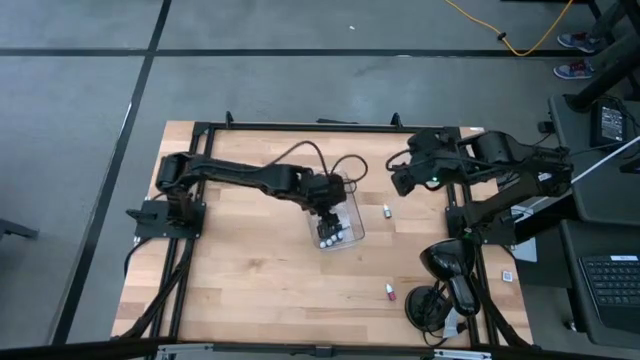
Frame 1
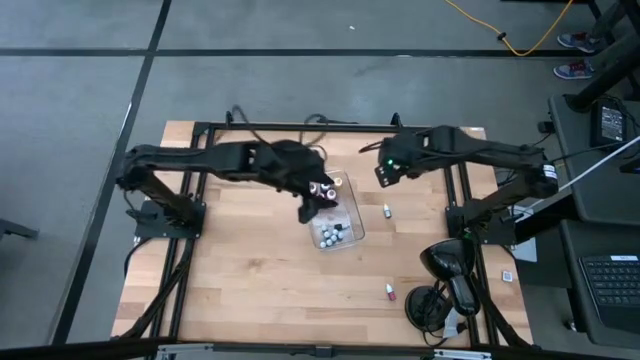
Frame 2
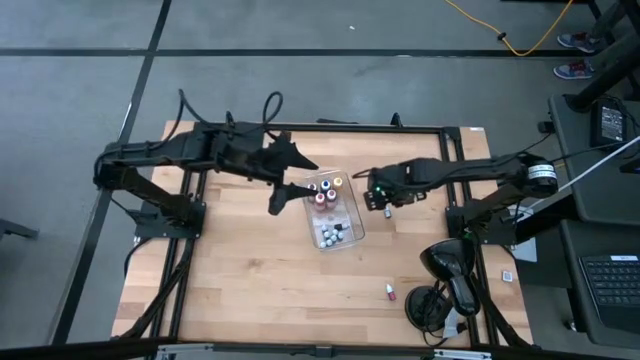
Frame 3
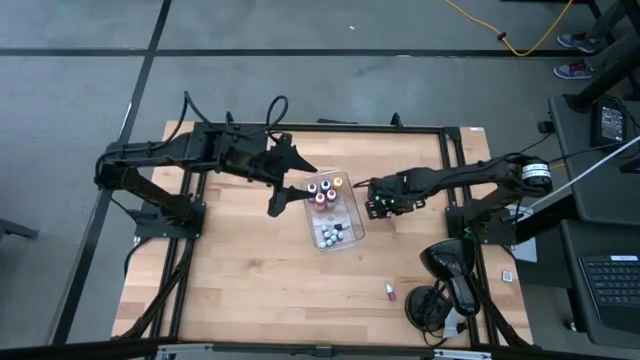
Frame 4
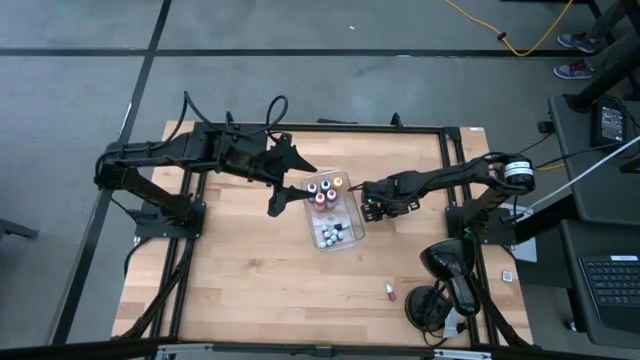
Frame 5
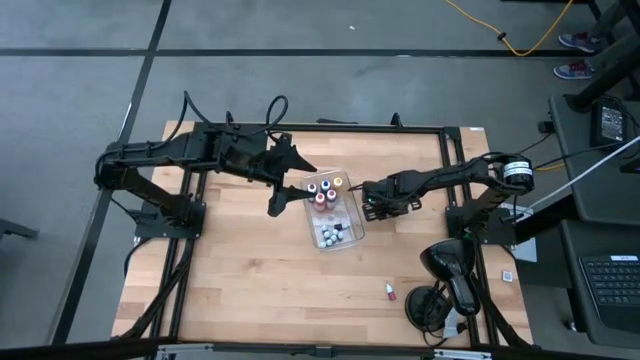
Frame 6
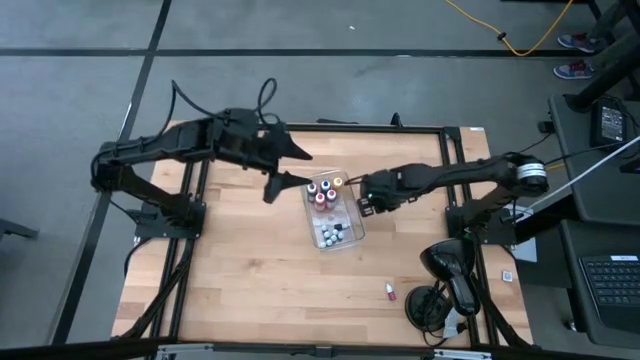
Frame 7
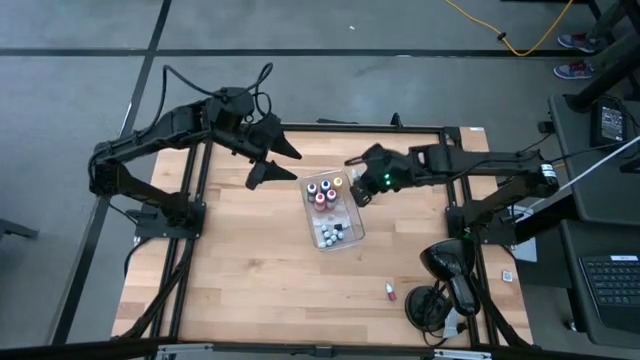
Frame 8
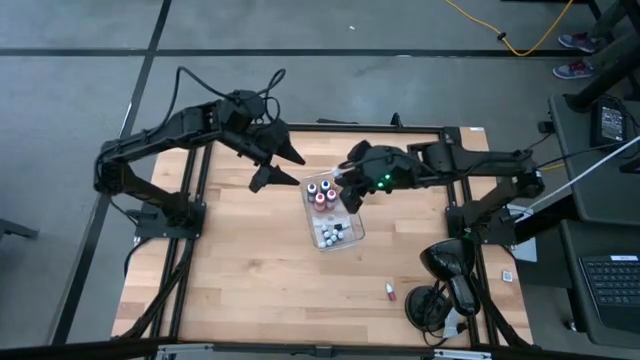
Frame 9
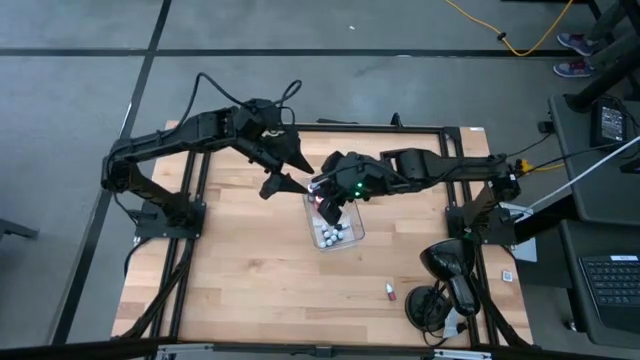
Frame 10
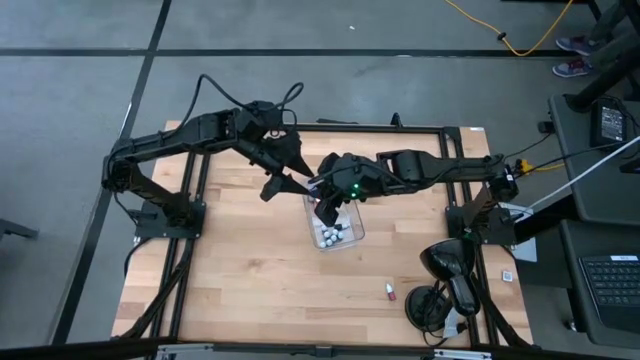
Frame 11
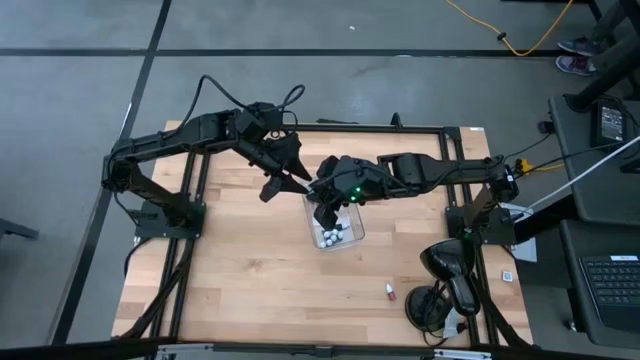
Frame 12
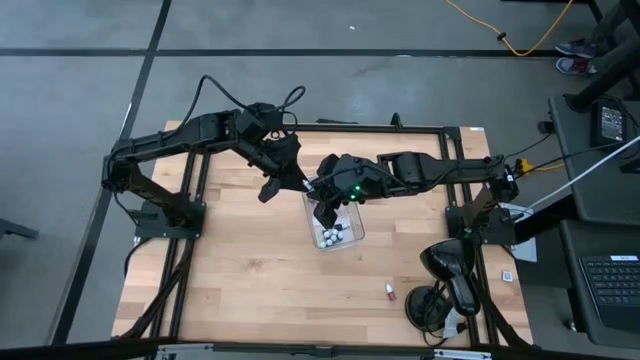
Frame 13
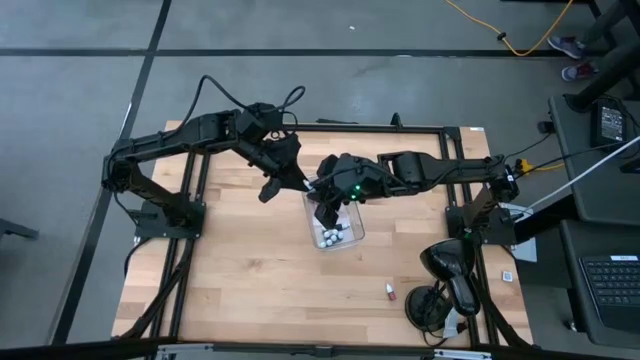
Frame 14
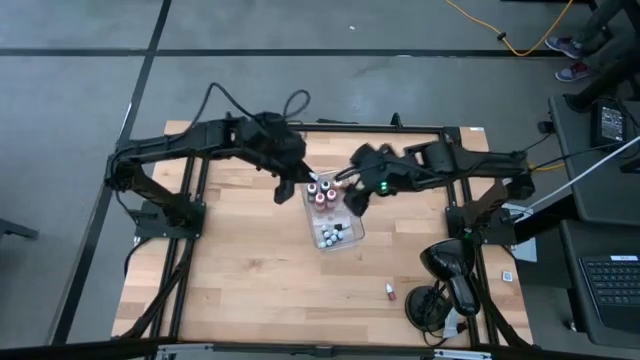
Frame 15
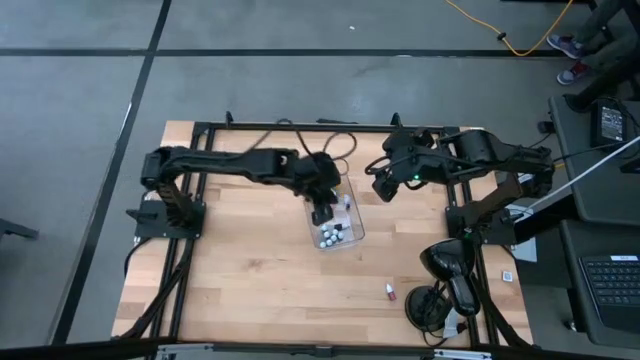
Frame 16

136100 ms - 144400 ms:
Task: Pick & Place food coloring
Put the top small red food coloring bottle into the bottom of the bin

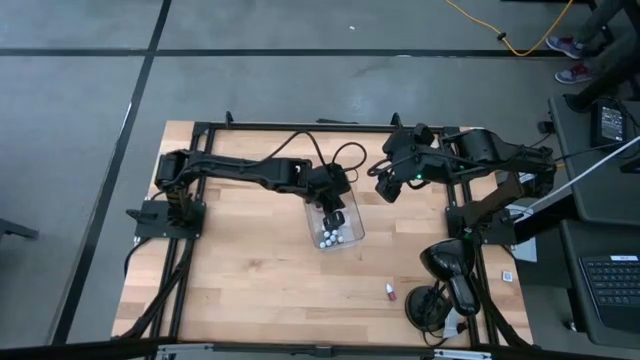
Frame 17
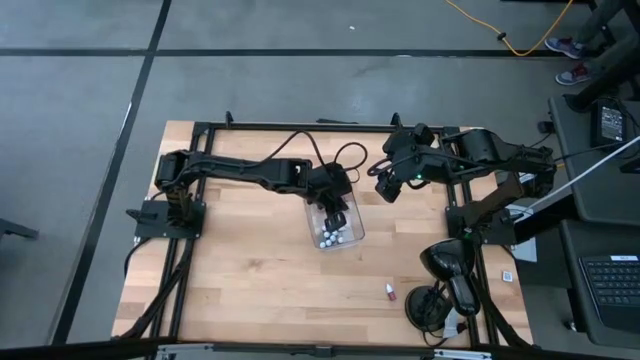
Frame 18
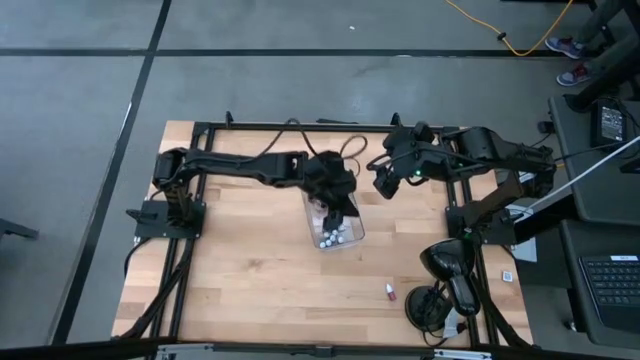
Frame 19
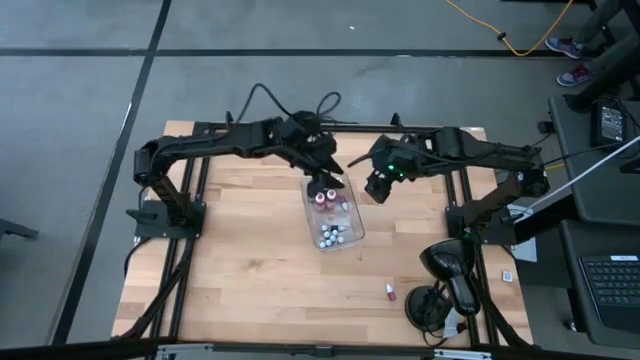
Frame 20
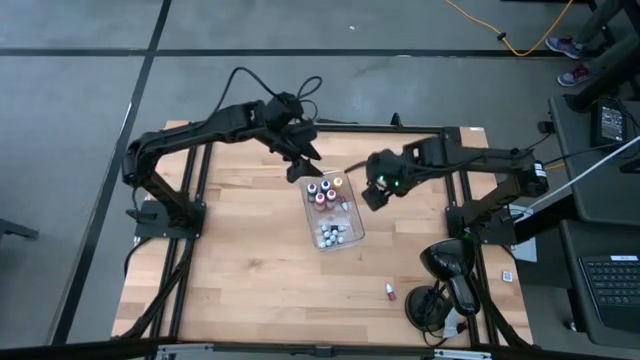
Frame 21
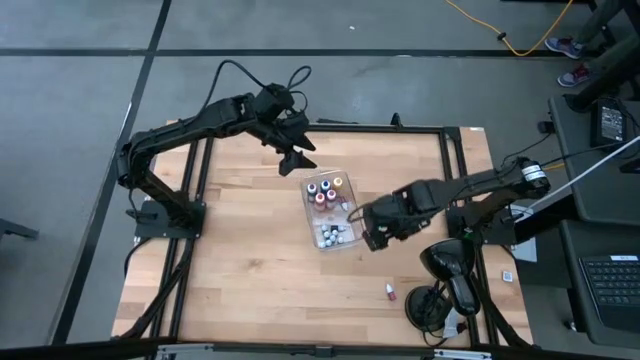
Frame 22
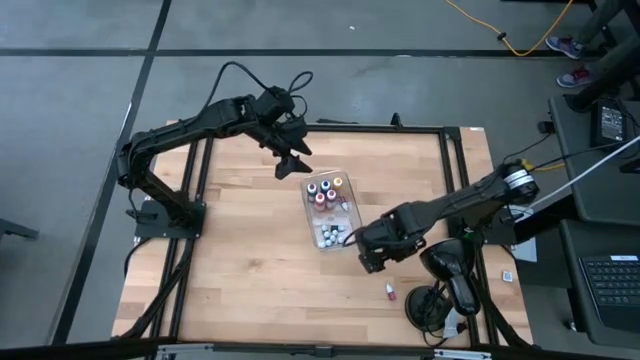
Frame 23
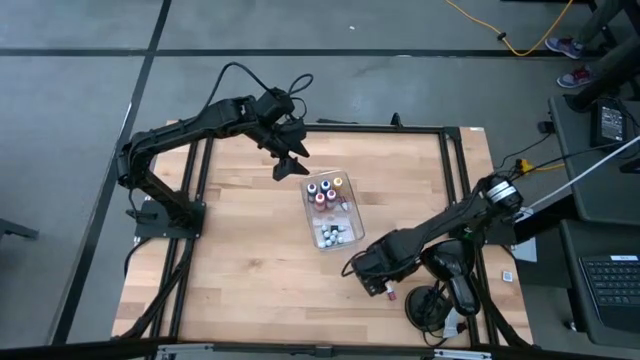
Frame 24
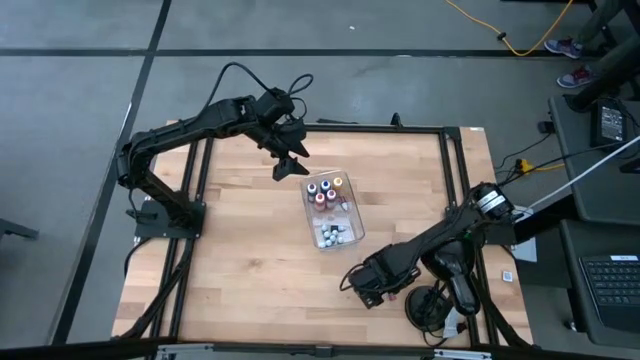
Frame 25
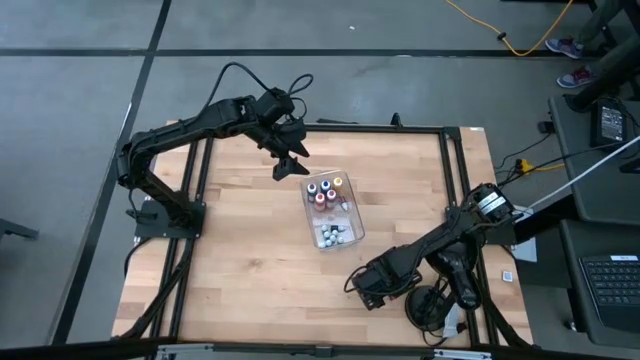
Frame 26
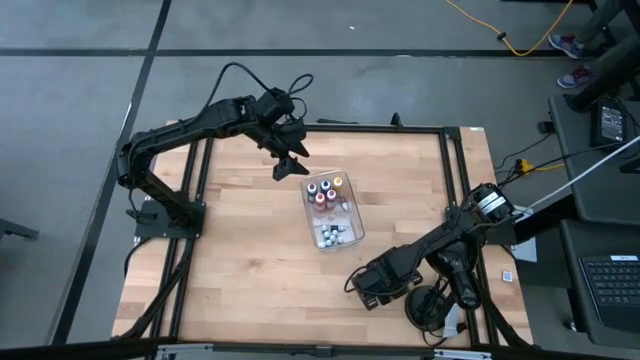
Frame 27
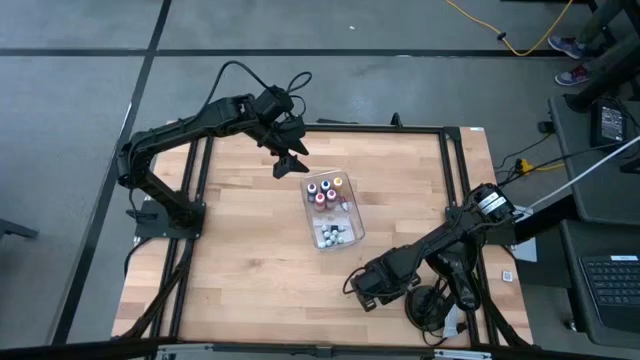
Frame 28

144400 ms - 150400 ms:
Put the small red food coloring bottle into the bottom of the bin

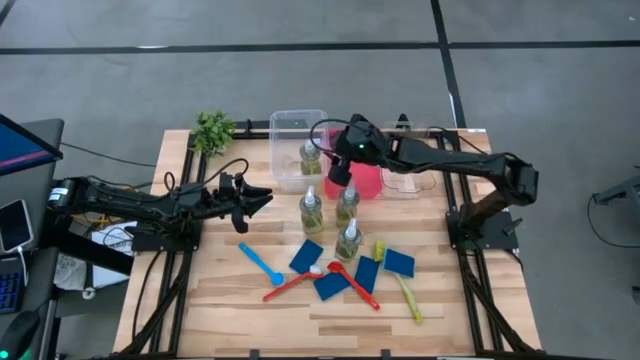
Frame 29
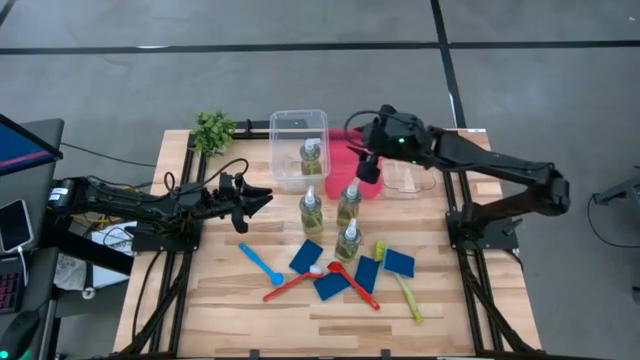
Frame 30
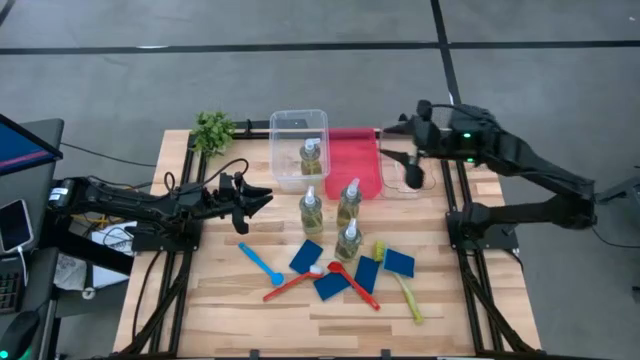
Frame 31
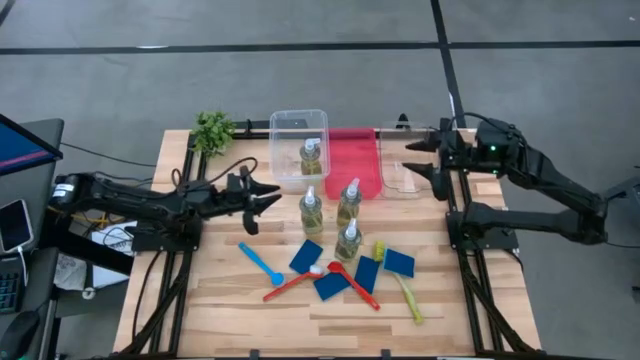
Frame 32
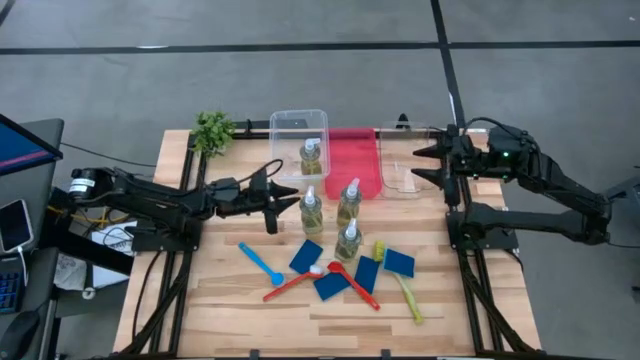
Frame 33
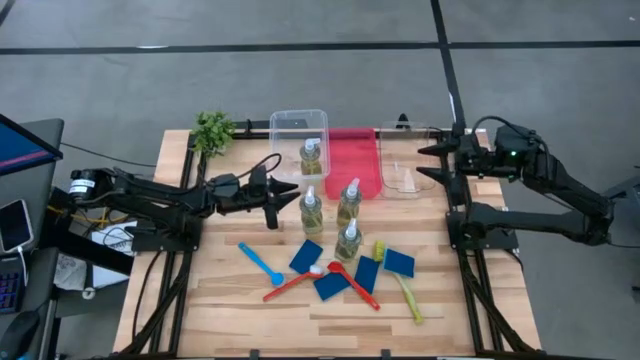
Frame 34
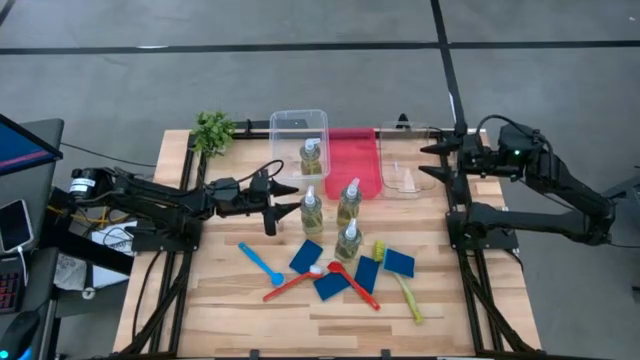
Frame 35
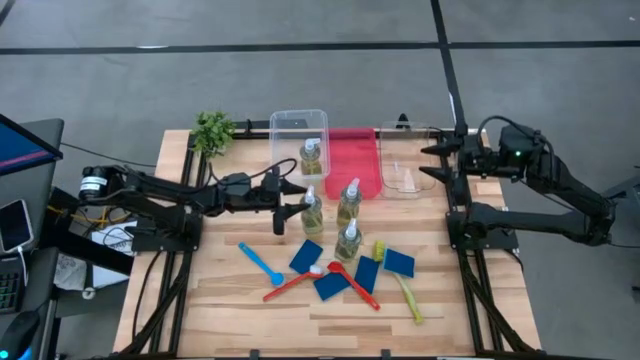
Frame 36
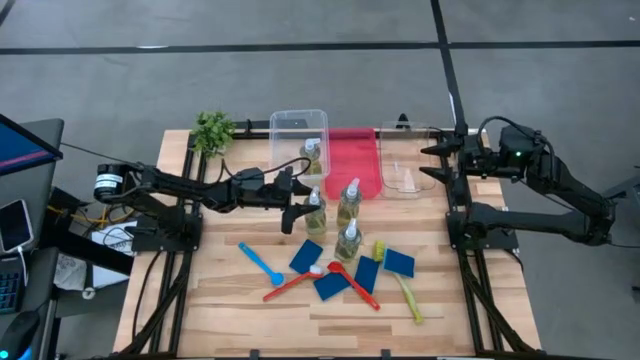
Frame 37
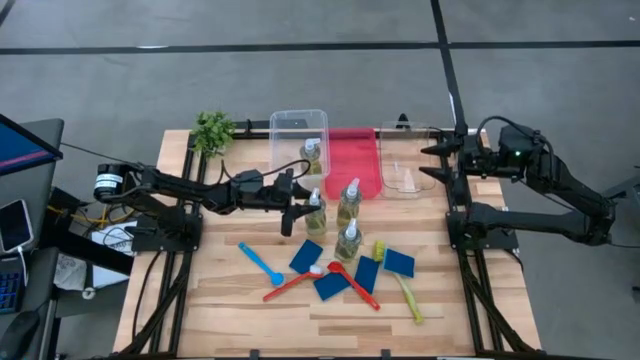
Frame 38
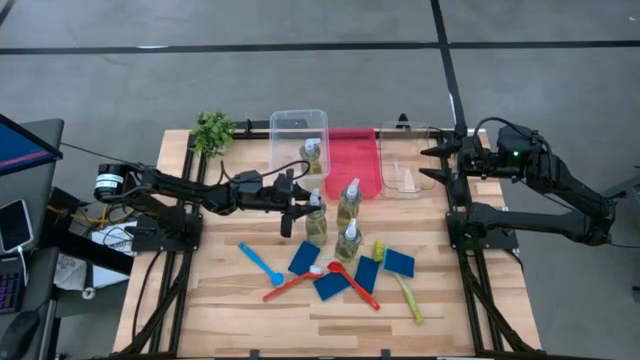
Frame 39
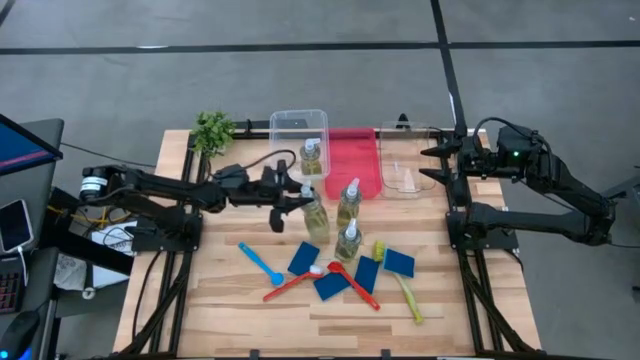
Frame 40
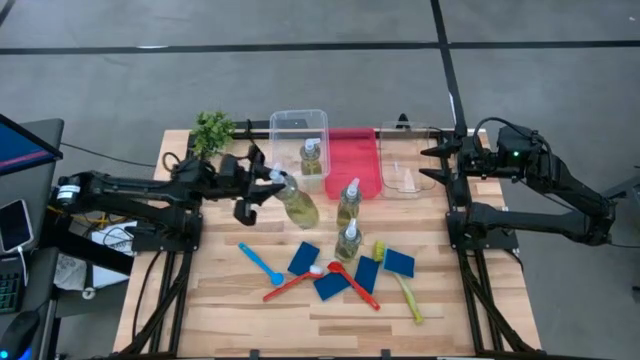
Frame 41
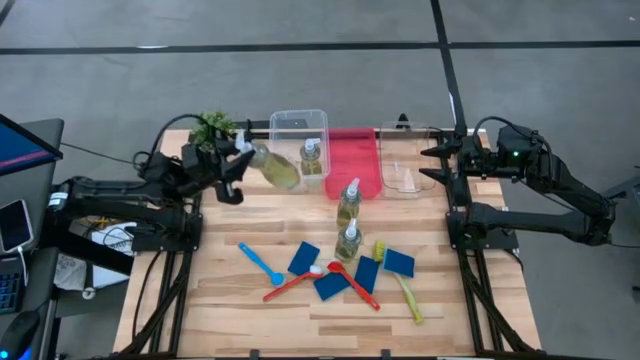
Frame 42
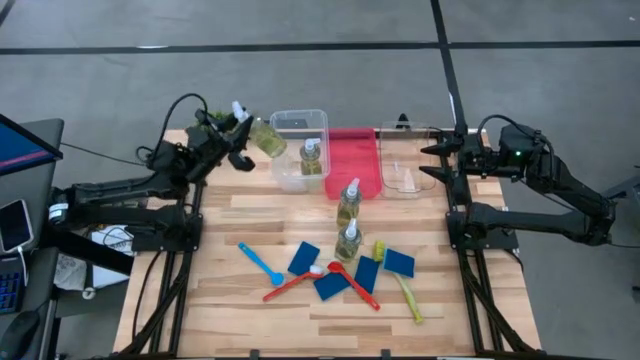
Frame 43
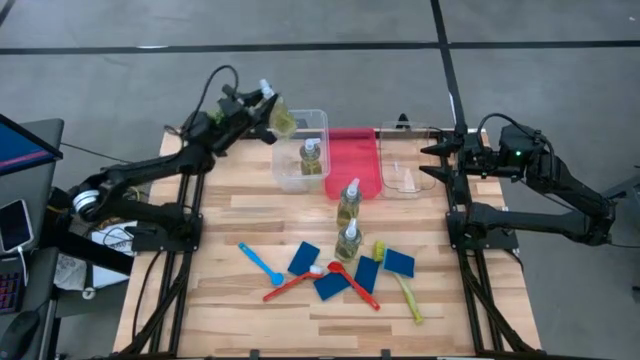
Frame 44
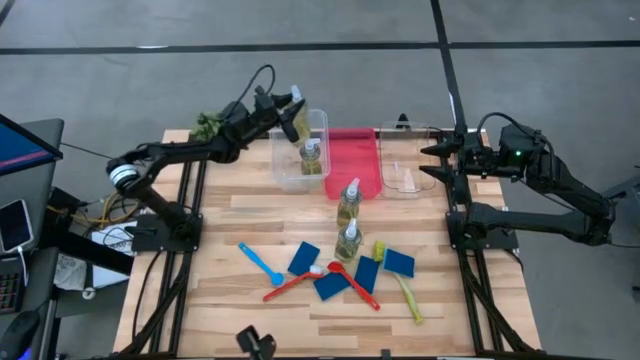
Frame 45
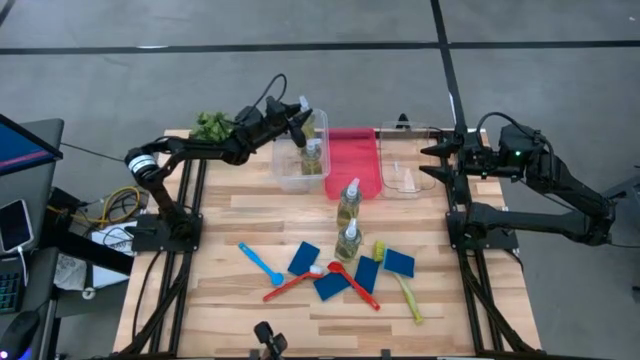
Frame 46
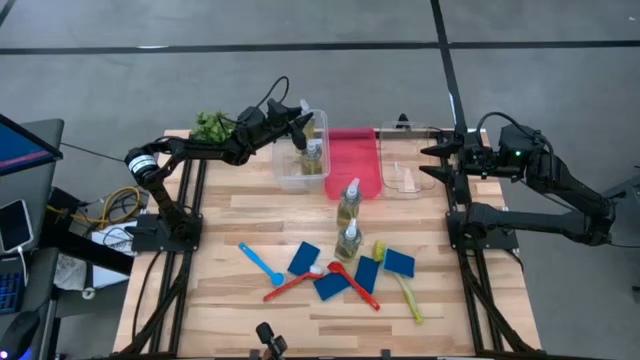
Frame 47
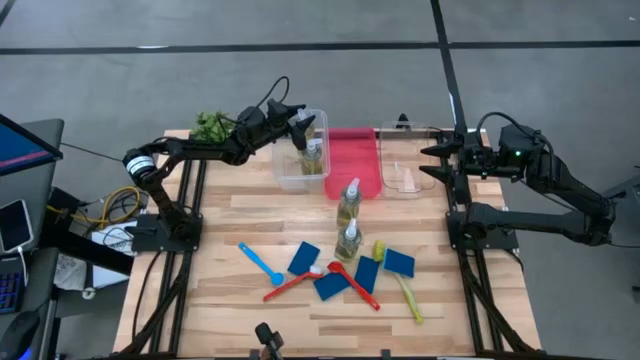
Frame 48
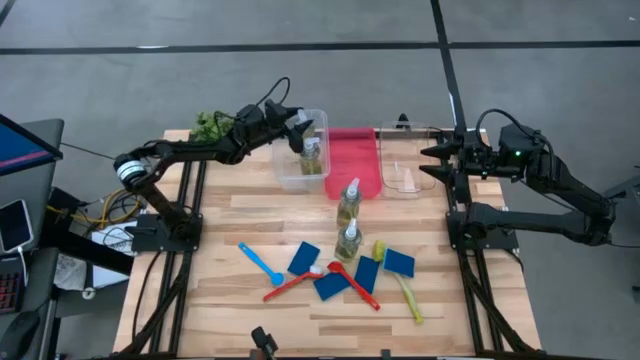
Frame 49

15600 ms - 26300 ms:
Task: Pick & Place Kitchen Sink Supplies
Put the transparent soap dispenser into the transparent container
